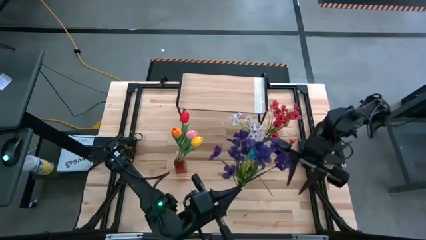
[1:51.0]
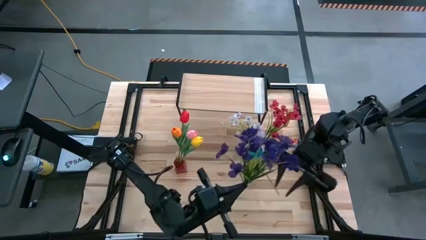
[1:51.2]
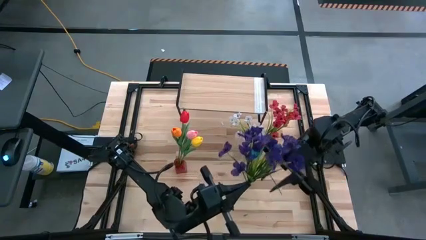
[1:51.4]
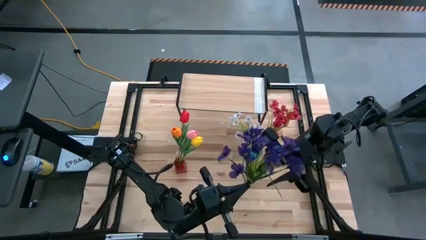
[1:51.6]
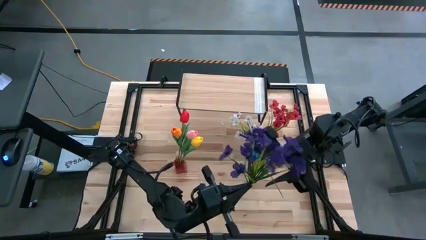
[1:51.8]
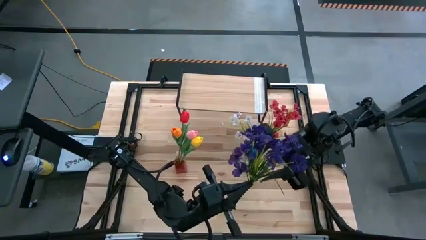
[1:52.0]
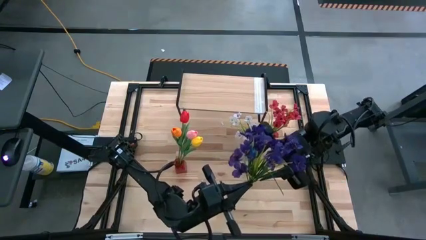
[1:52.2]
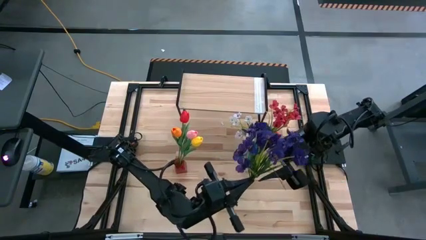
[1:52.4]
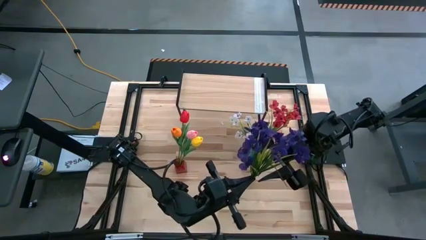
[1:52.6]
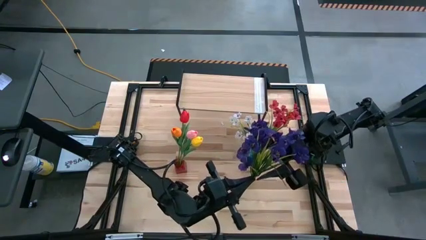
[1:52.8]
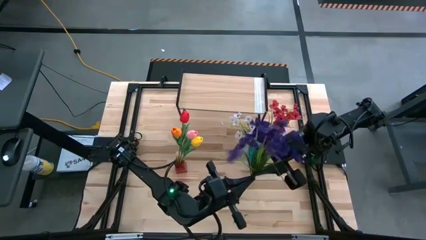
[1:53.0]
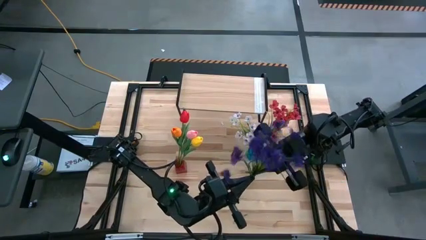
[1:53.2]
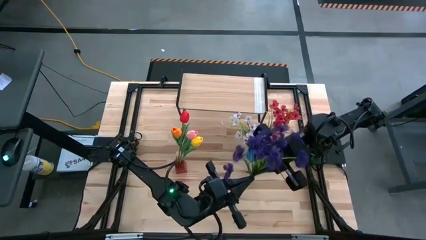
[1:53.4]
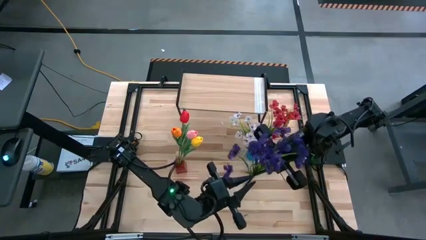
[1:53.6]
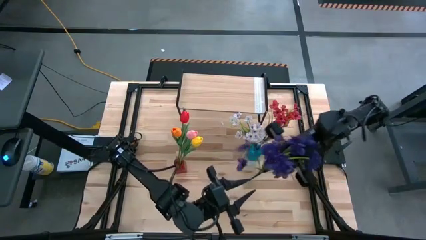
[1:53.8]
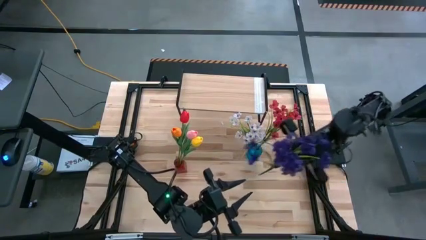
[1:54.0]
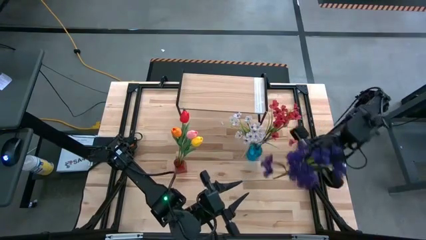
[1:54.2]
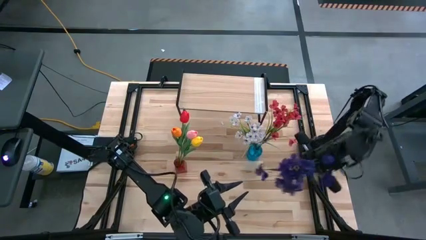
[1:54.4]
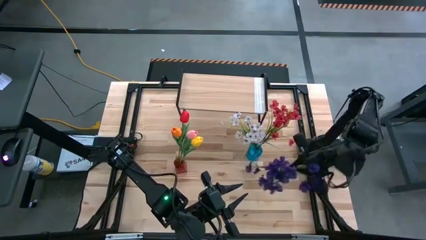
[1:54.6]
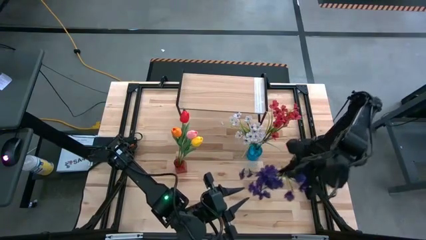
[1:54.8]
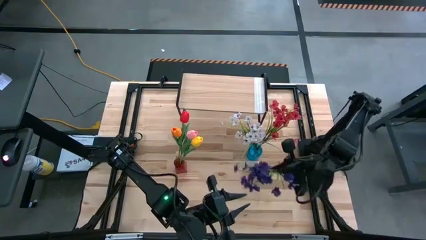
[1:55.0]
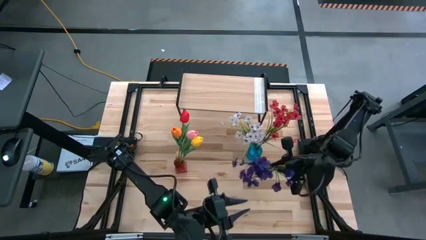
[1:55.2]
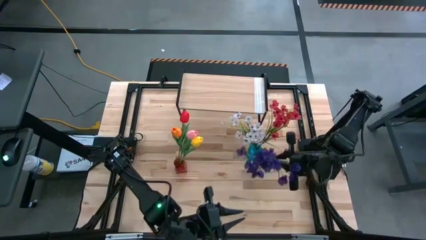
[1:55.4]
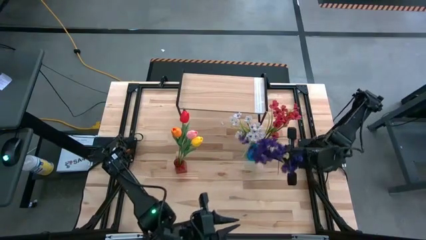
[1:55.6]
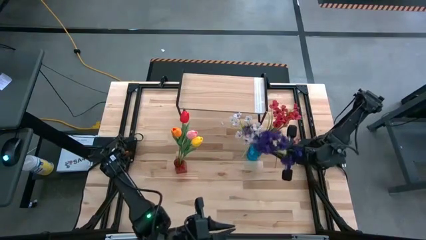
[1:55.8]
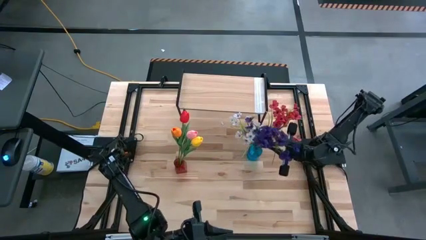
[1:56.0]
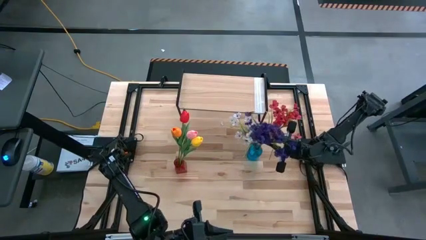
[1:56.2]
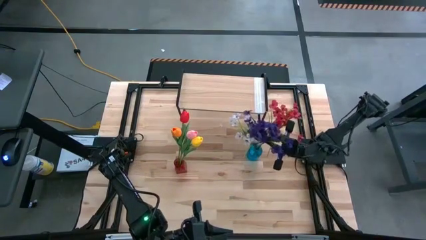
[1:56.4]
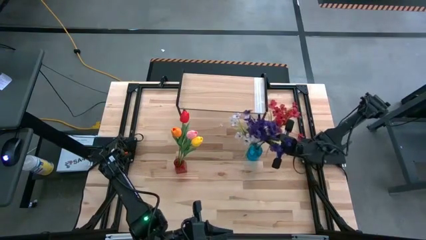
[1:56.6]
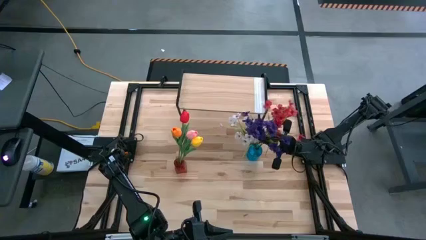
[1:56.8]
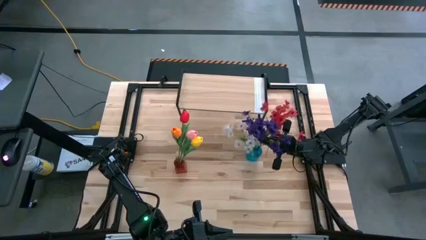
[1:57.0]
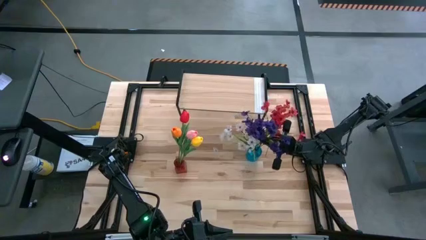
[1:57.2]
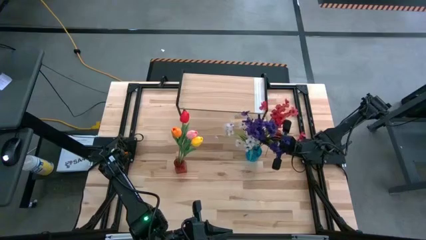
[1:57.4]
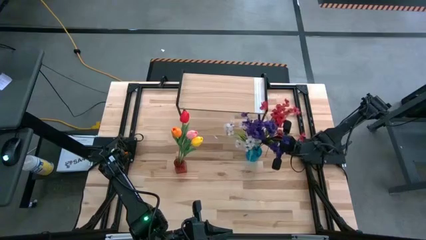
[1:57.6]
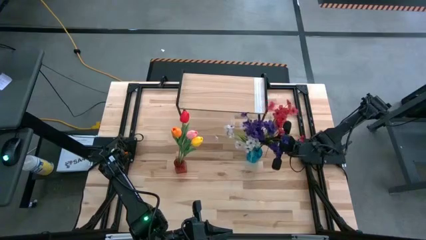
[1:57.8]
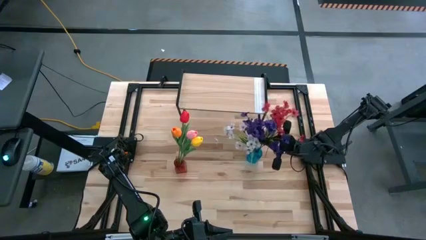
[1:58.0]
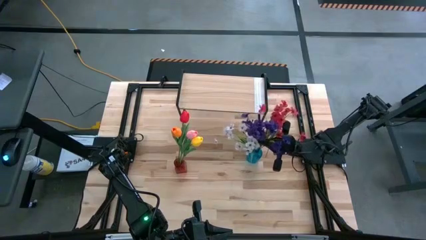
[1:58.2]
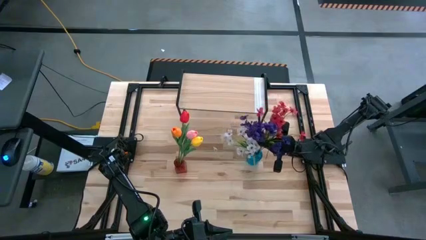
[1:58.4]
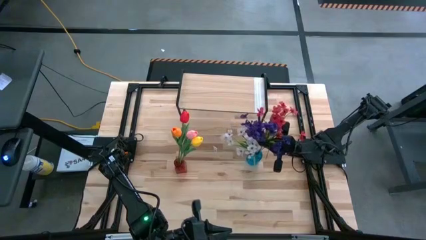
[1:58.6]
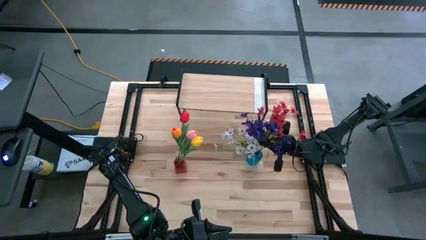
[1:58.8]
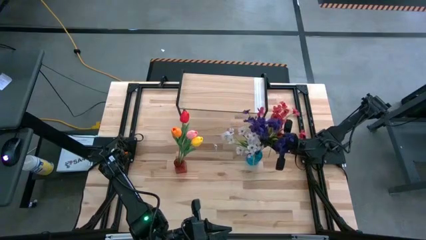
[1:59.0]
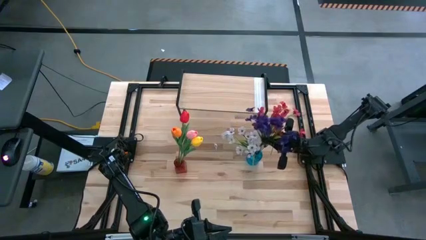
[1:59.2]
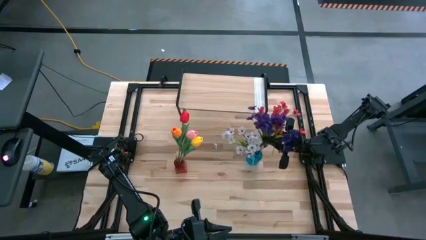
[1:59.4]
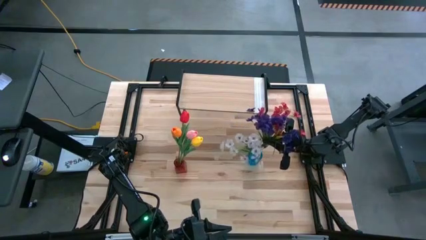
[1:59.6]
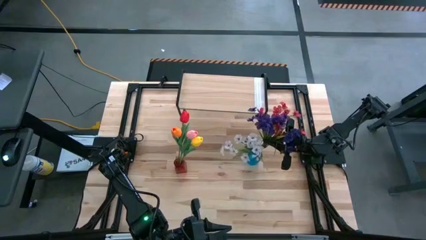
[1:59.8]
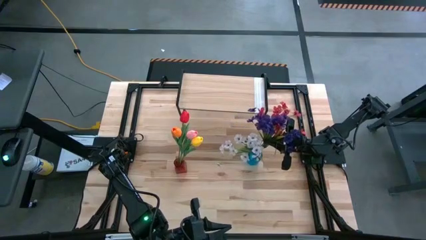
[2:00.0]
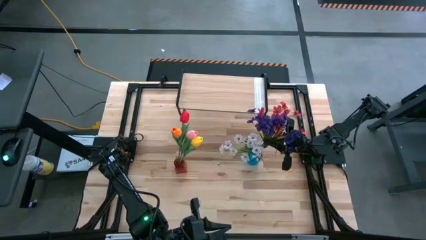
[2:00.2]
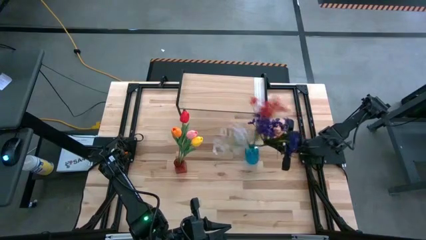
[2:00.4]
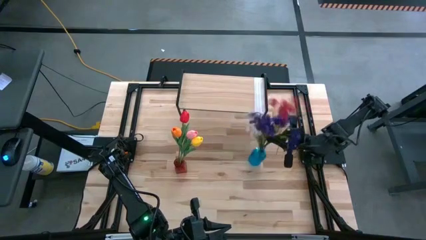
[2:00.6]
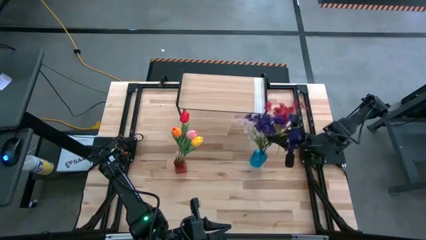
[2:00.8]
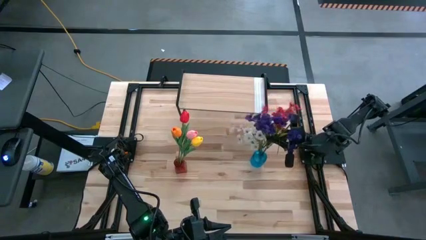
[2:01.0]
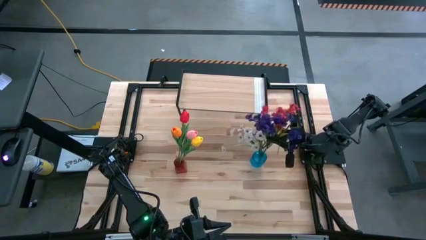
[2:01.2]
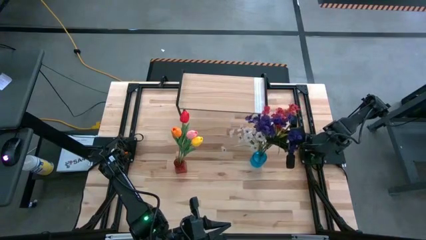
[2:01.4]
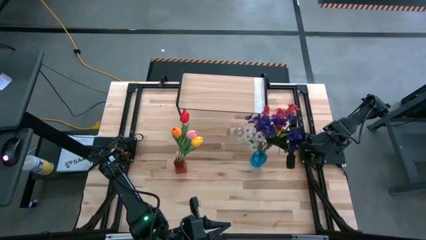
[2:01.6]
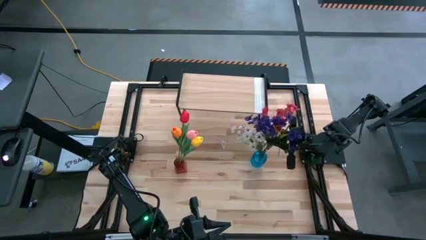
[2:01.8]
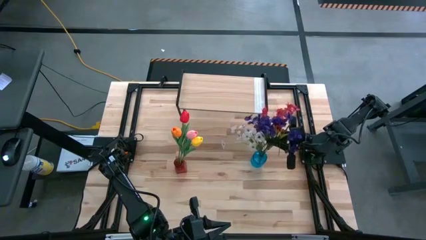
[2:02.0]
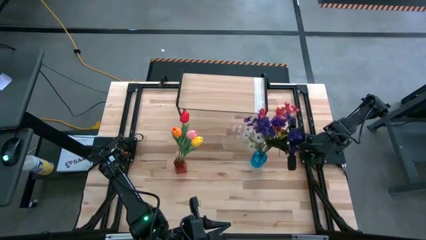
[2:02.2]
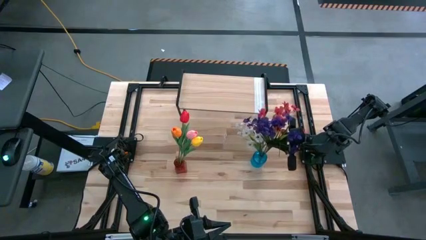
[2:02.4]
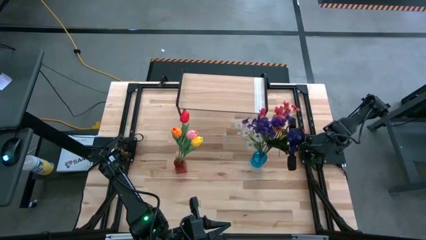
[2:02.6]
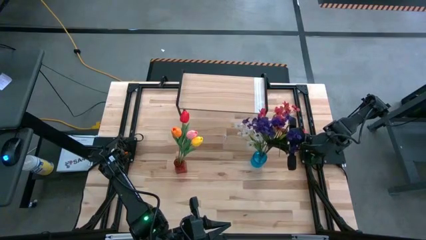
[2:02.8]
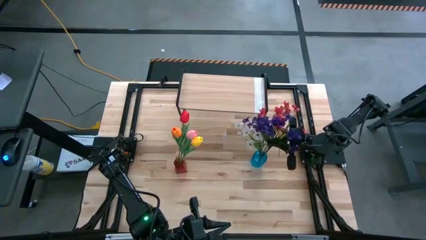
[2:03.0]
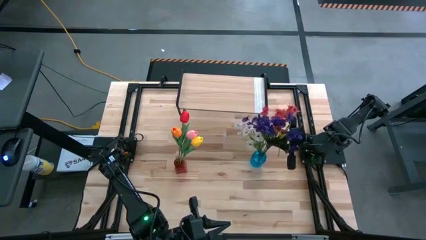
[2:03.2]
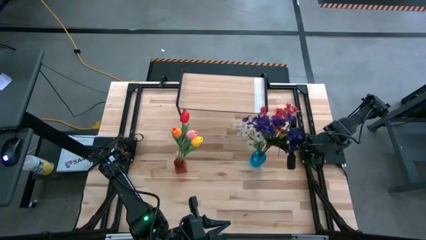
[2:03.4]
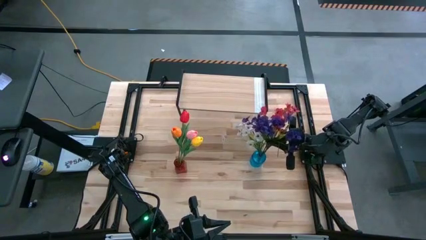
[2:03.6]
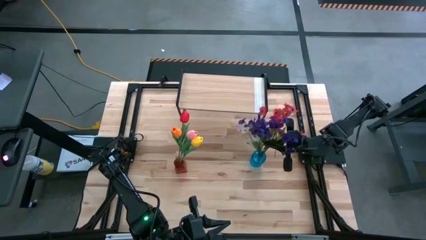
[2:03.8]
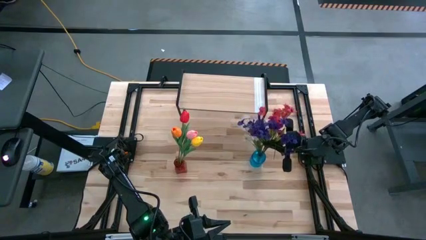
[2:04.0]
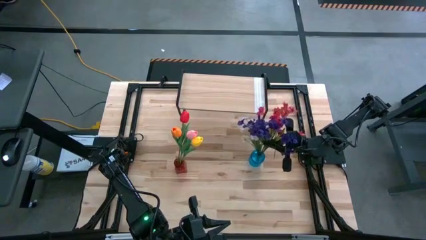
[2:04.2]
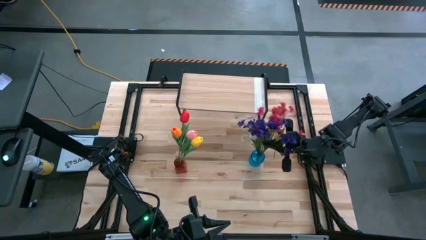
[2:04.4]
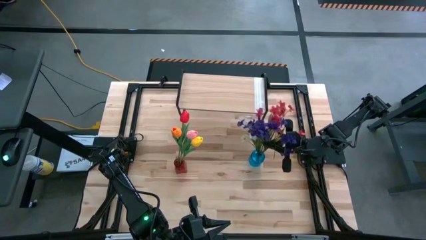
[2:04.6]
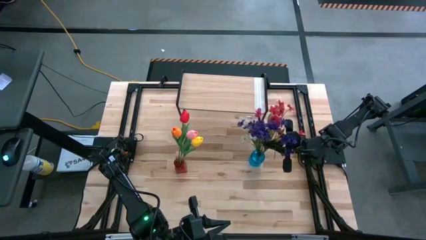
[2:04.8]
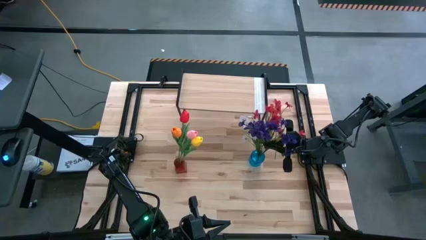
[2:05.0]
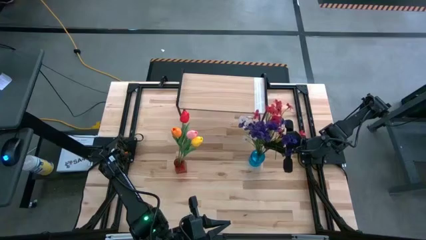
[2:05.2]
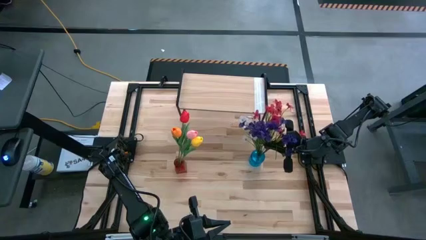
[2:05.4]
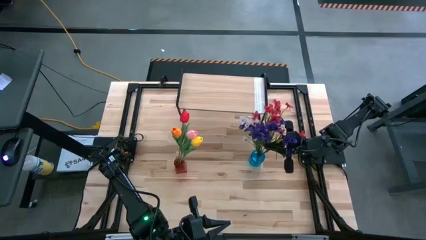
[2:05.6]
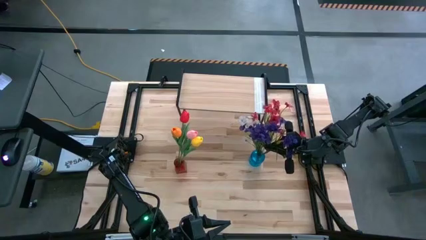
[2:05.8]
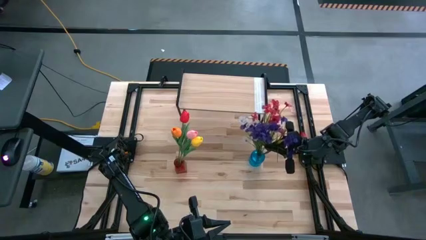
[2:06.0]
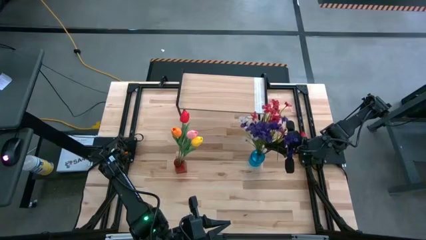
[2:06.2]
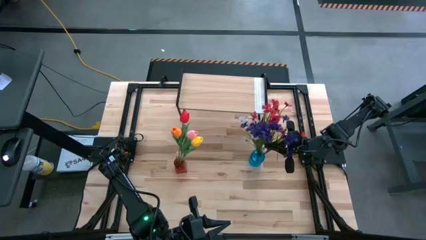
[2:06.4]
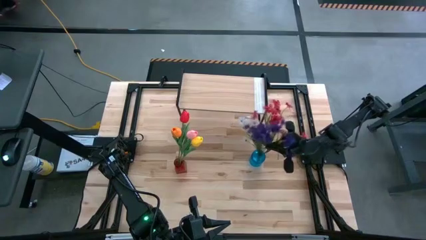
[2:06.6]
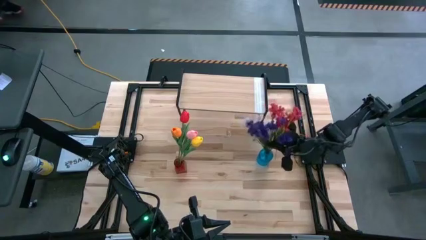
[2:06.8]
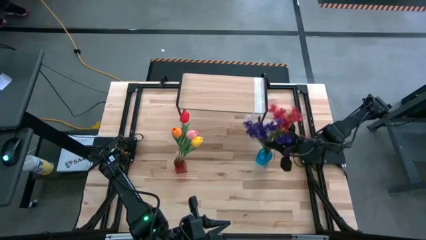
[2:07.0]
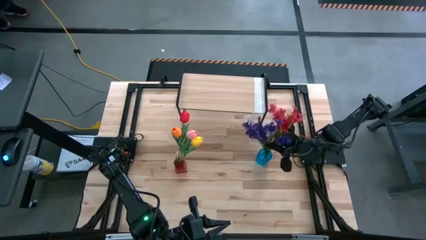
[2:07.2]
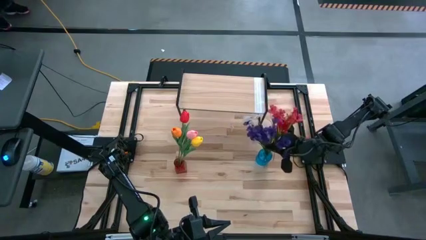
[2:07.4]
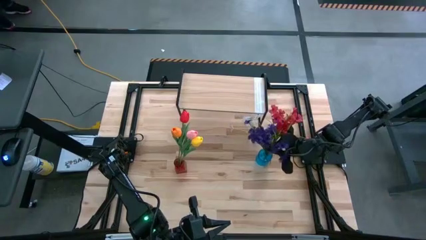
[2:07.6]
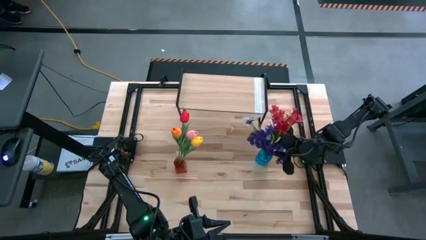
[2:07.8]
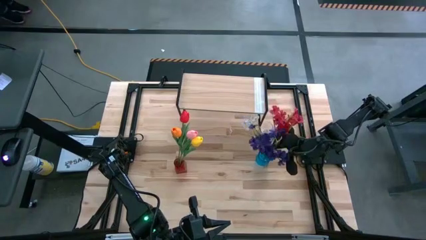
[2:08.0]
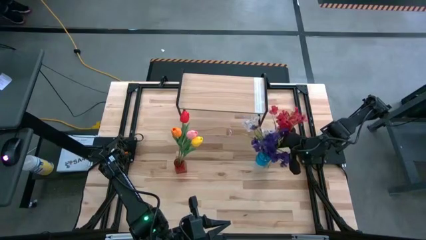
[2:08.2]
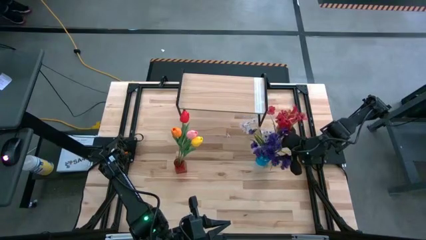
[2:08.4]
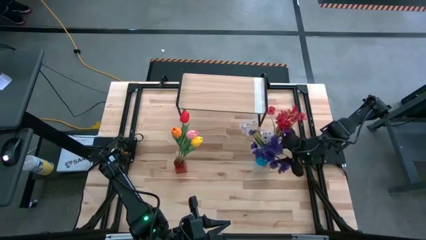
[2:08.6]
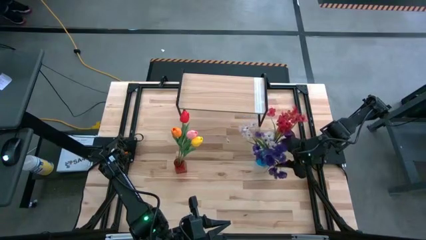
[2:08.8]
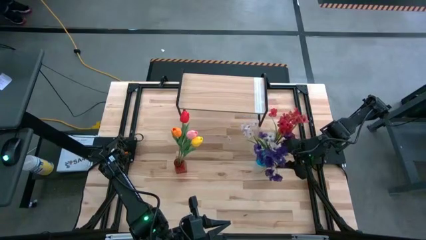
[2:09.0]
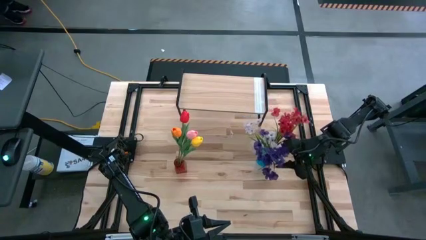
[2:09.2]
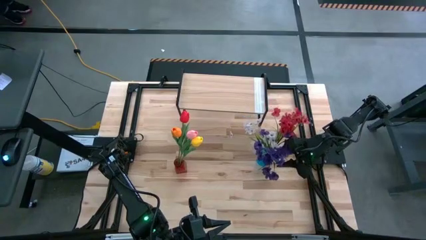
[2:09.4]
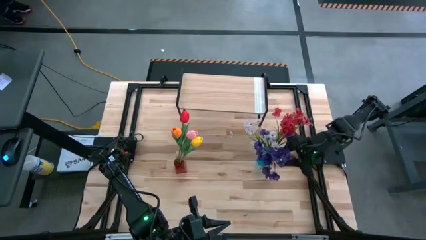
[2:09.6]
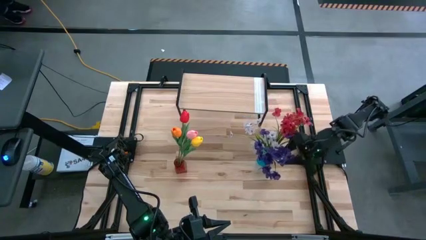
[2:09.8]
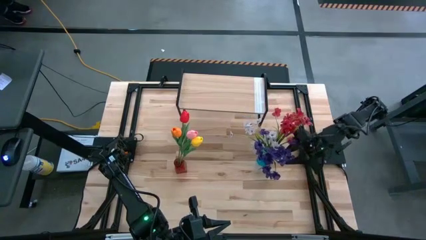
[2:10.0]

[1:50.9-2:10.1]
Task: Pick and place flowers into a vace then onto a shelf
Put the violet flowers into the blue vase
